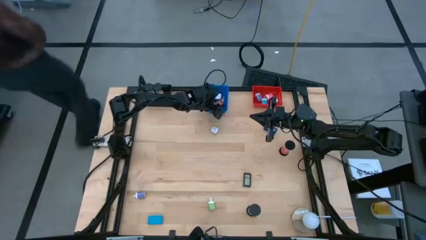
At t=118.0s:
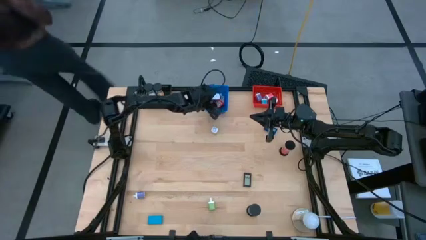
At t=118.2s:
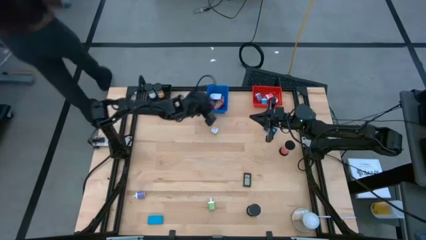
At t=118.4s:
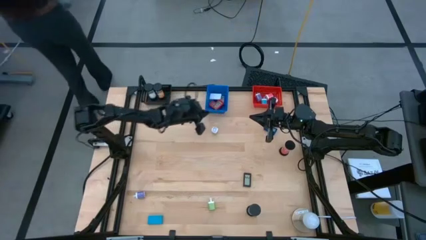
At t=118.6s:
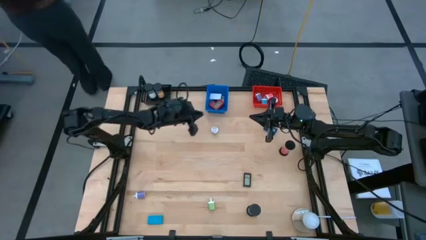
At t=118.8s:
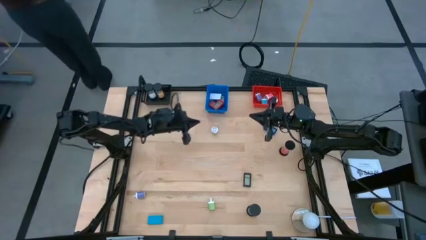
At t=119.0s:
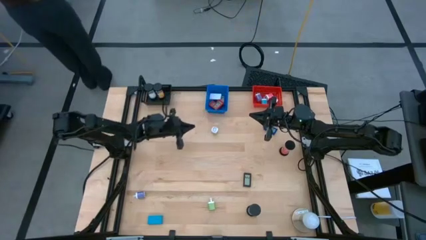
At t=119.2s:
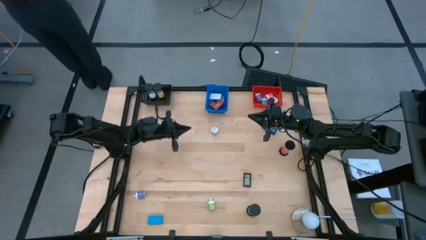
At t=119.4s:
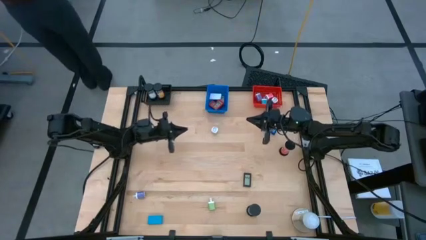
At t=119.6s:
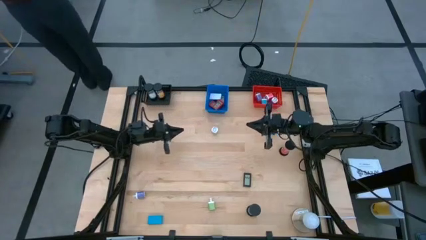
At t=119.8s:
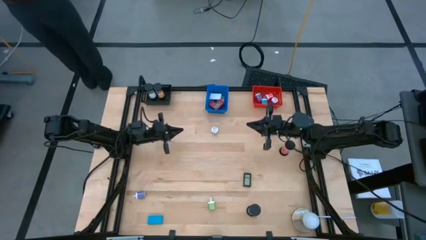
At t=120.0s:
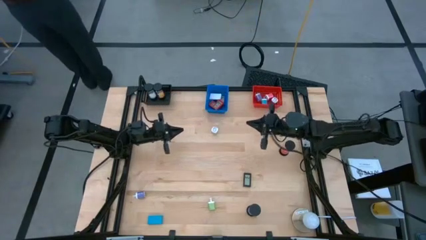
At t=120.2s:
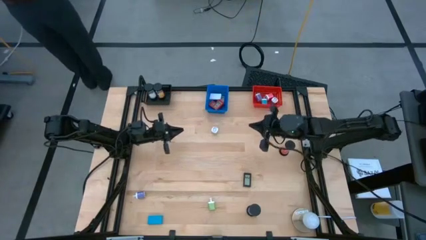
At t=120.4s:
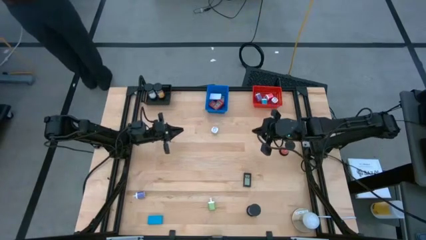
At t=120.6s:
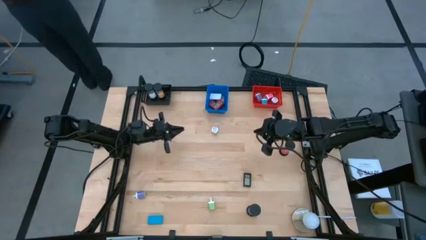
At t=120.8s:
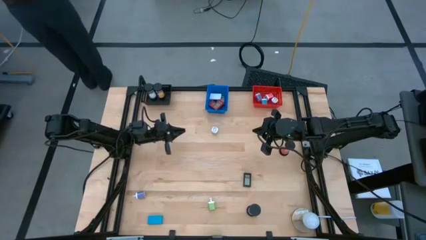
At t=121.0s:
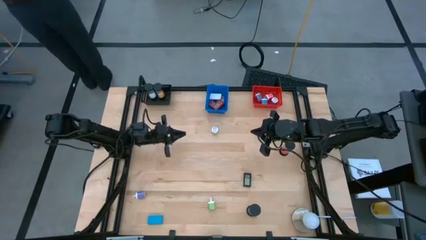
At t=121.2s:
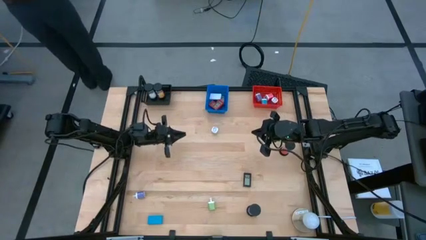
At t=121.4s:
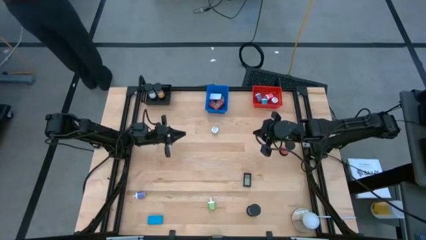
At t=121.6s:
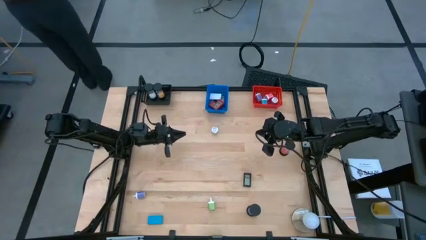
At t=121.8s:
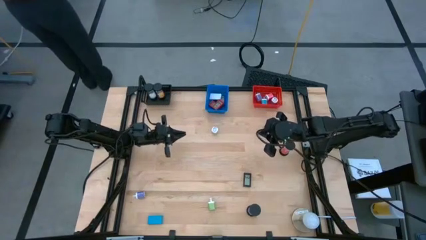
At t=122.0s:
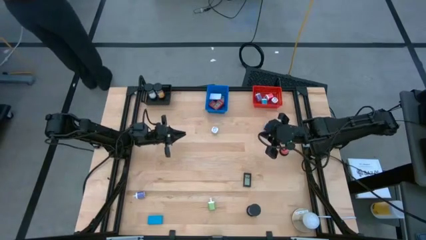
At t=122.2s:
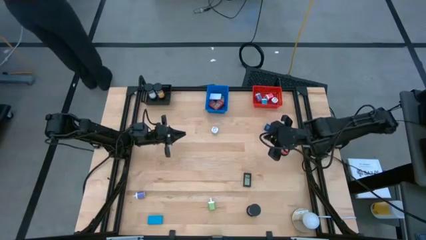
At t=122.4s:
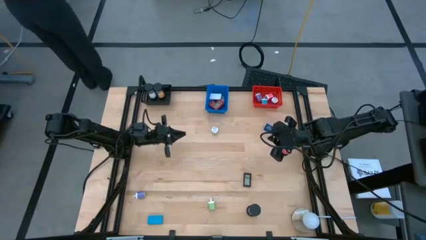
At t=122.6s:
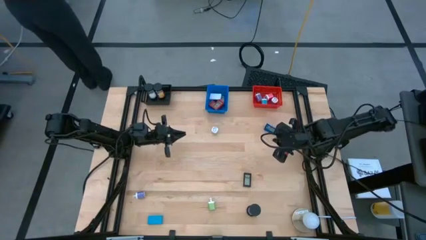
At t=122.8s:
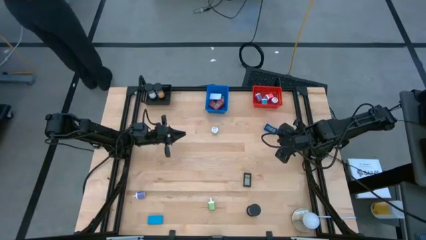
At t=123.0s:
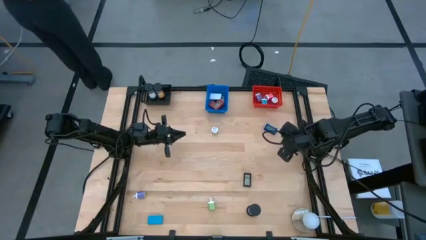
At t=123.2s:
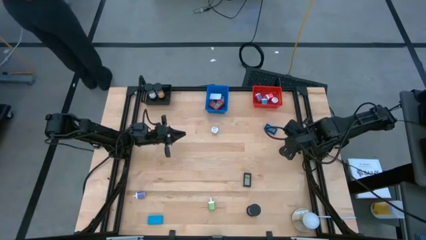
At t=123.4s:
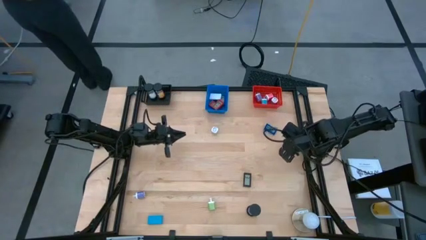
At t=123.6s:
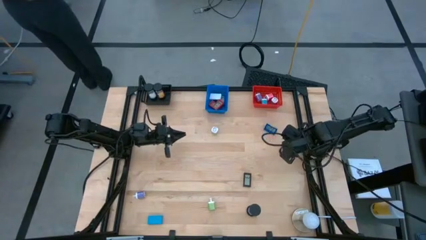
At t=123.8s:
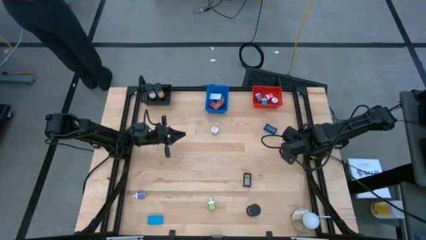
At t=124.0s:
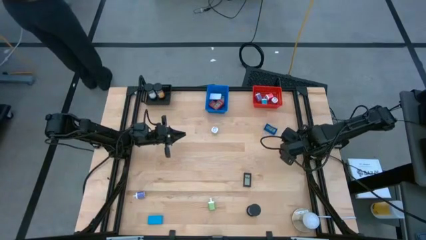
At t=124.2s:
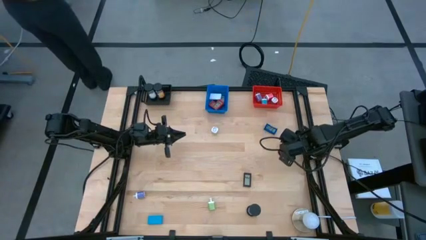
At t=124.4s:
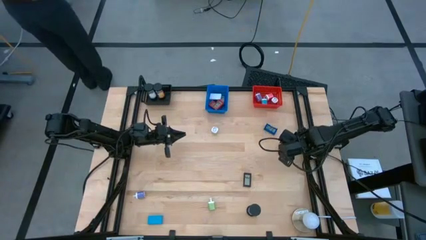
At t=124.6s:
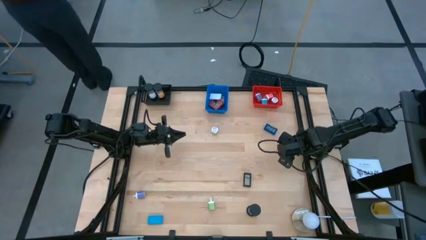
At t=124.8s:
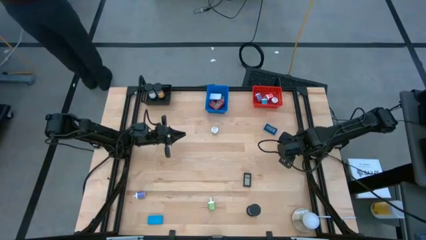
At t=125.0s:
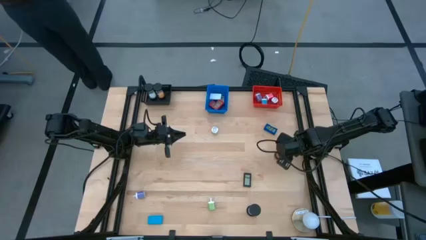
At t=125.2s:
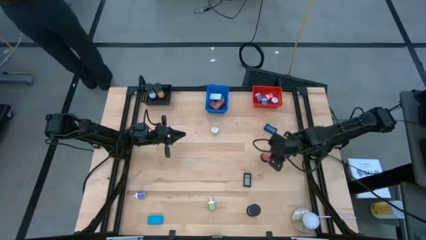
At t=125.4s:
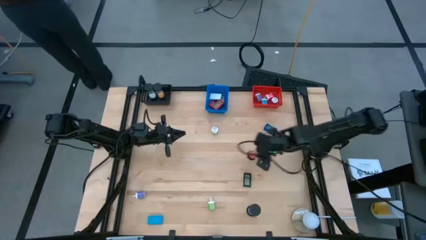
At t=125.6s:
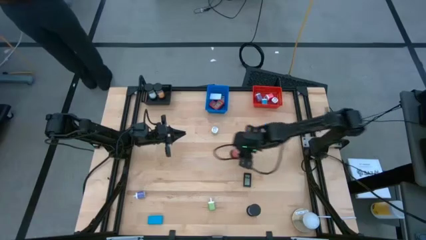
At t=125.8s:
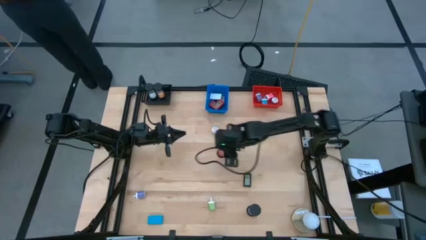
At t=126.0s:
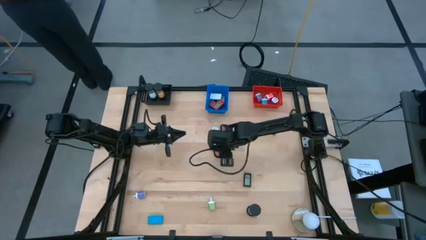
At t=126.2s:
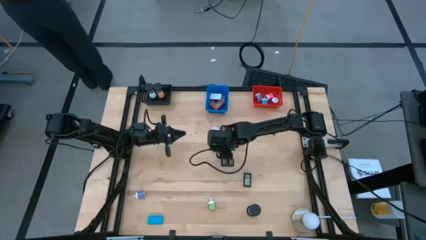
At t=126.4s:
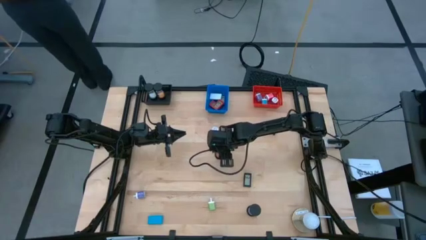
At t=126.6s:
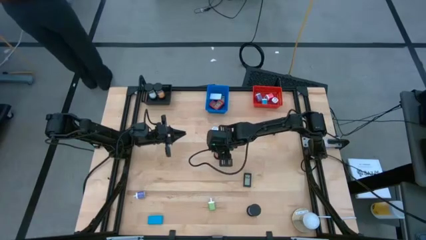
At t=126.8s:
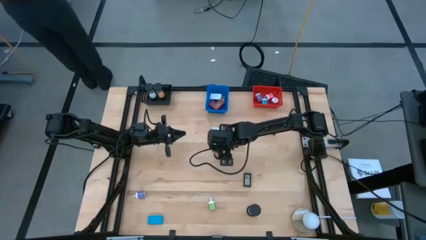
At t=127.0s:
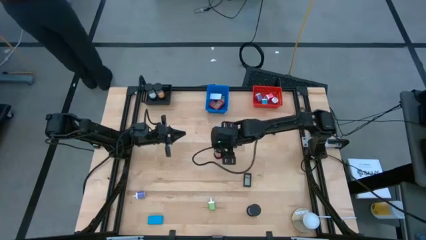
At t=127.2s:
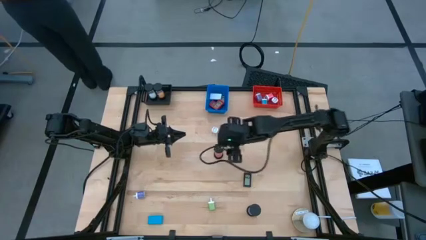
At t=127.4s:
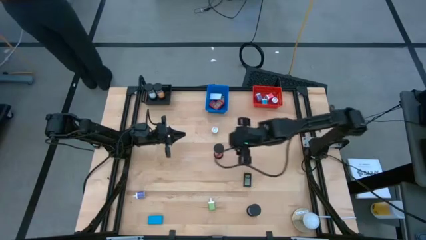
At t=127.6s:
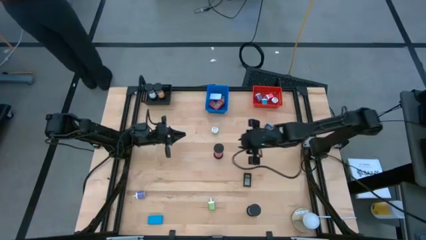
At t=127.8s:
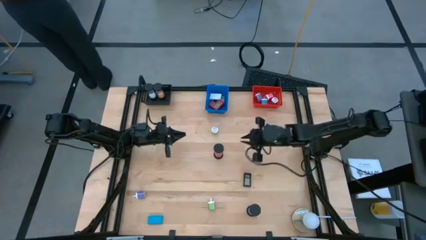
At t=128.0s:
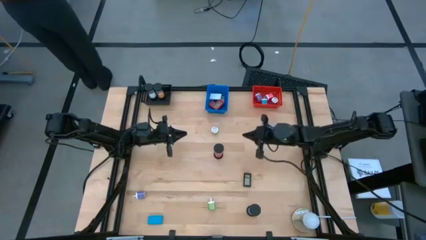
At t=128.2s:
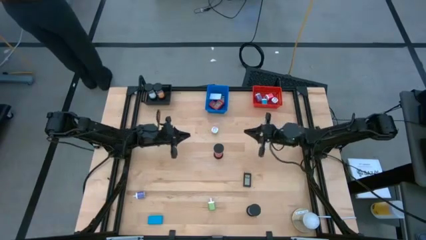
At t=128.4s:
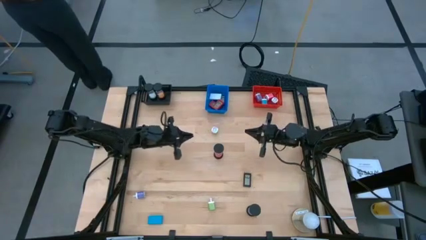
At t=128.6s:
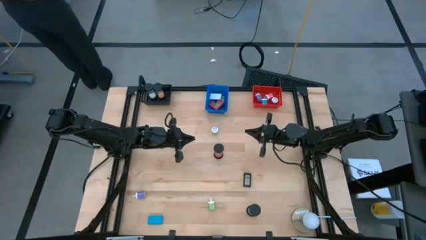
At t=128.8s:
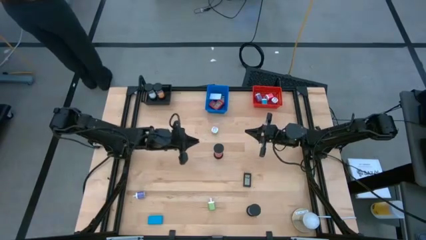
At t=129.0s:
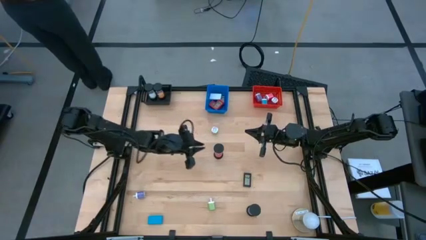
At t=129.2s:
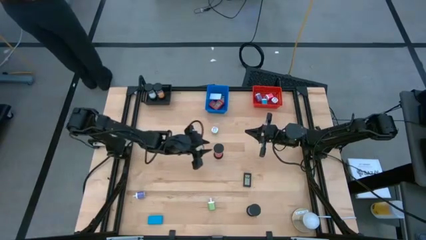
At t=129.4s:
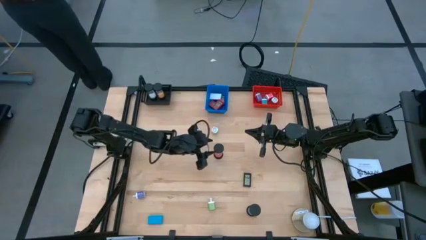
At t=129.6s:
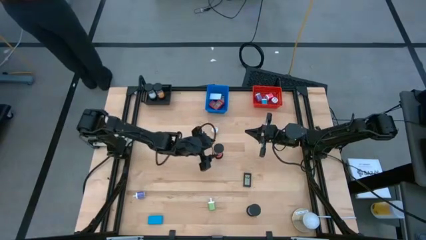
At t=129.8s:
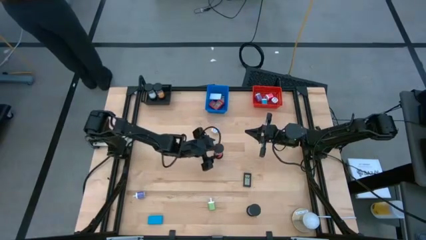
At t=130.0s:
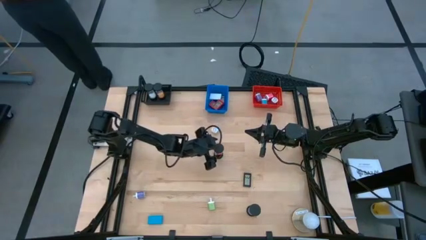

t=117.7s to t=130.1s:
Task: Pick & Place Office items
Put the pink hourglass into the black basket

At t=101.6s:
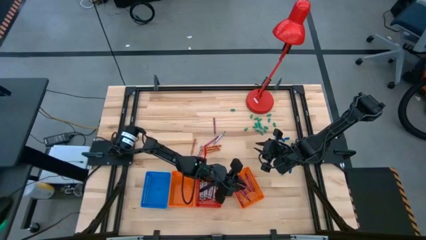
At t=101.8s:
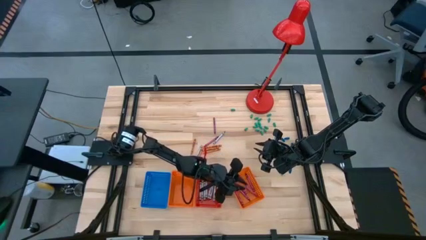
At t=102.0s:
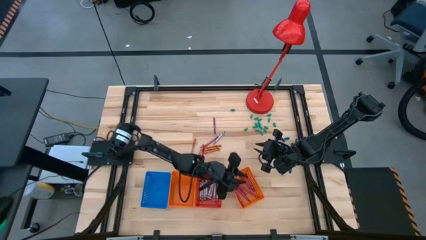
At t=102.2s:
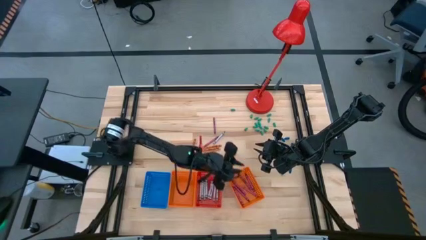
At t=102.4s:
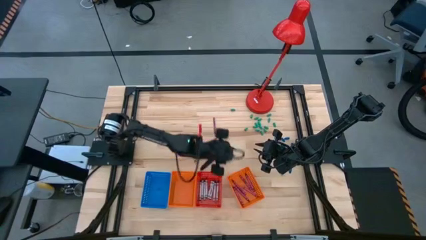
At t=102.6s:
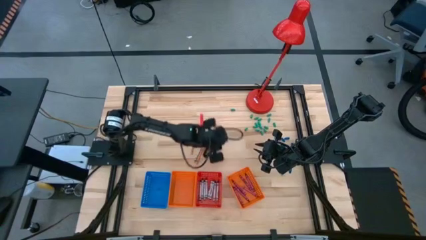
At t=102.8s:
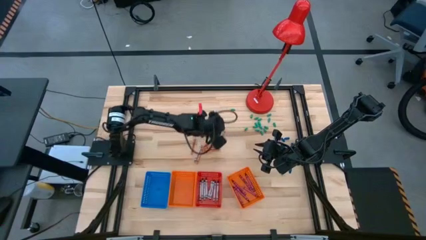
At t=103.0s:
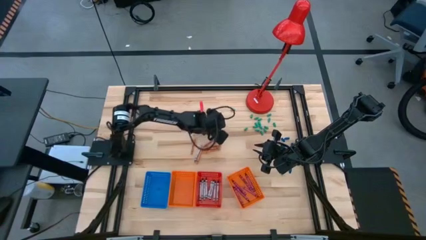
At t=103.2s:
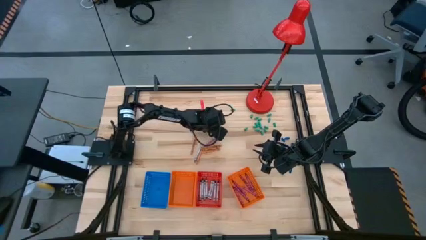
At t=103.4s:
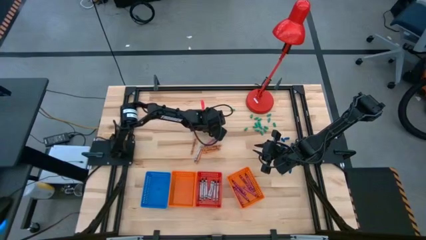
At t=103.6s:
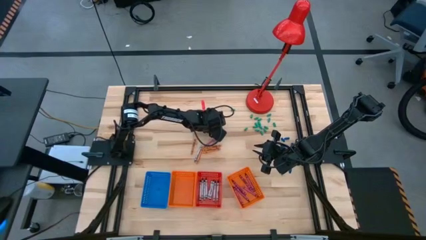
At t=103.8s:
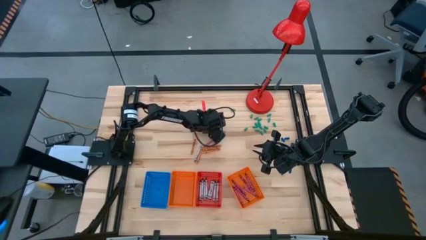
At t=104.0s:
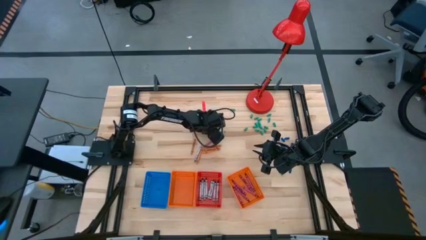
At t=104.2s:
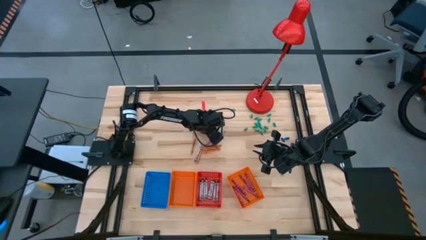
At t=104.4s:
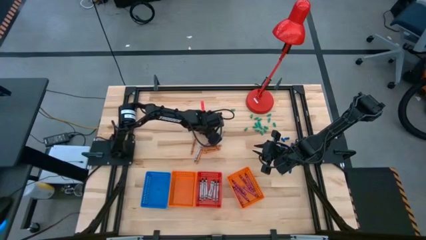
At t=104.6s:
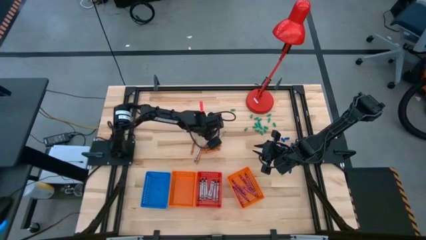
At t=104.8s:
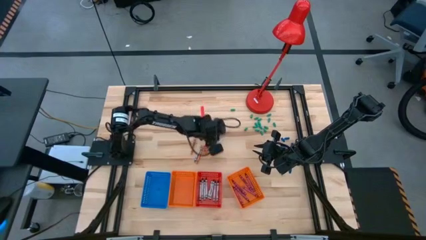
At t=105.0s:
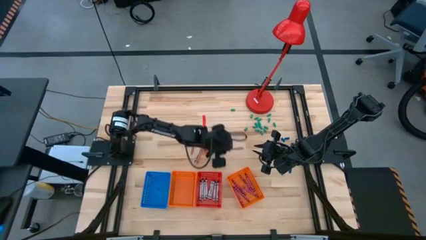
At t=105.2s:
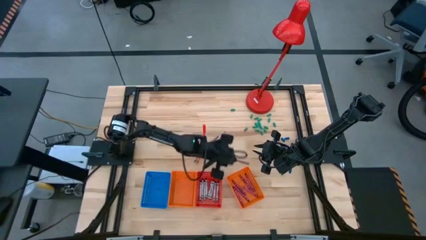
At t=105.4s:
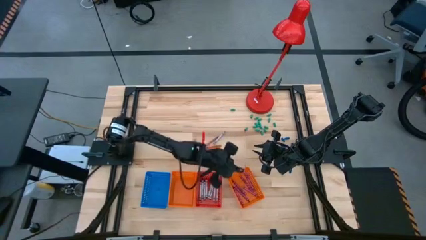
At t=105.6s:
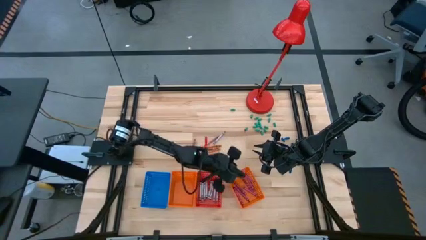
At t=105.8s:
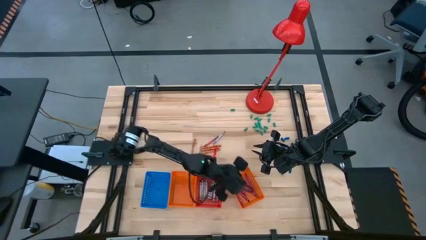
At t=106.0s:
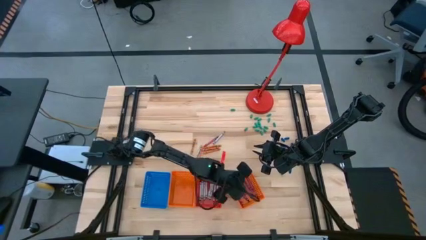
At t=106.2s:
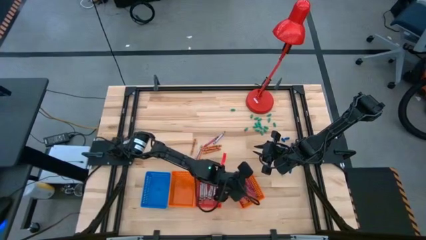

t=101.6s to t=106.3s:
Task: Sort crayons
Put the red crayon into the right orange bin
